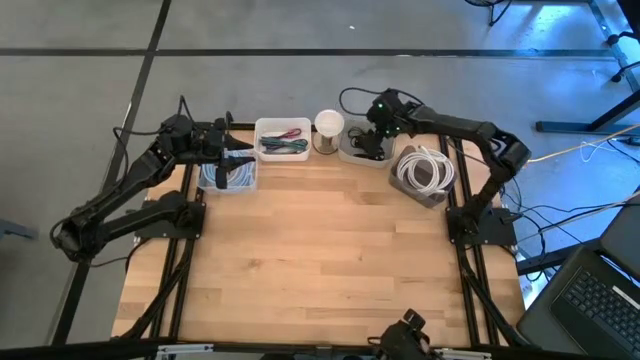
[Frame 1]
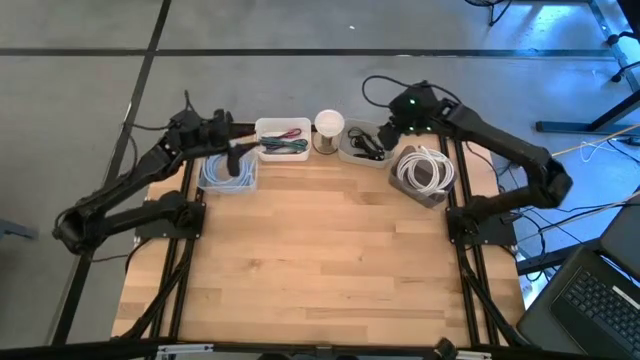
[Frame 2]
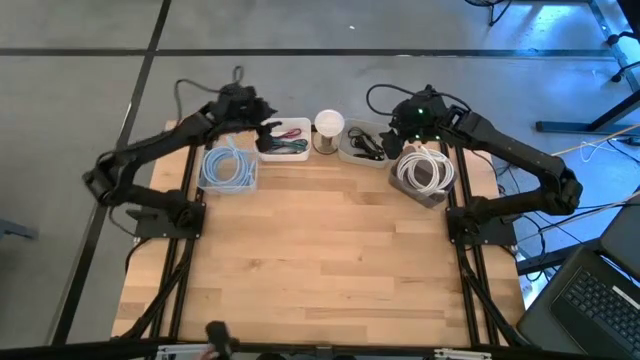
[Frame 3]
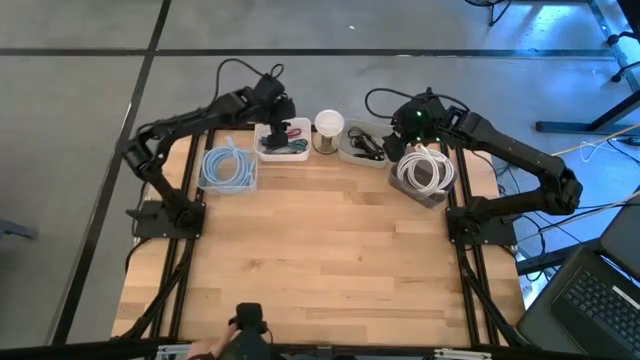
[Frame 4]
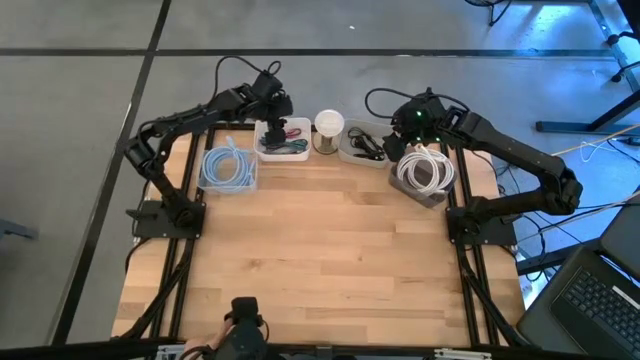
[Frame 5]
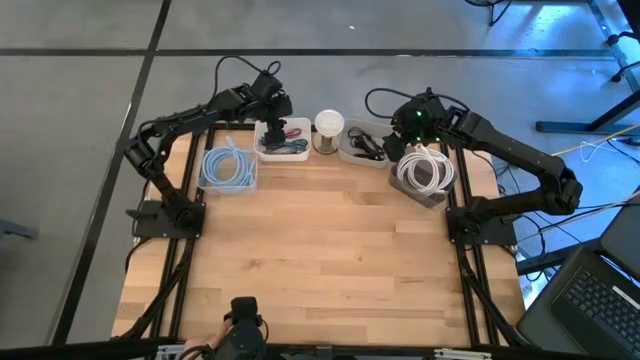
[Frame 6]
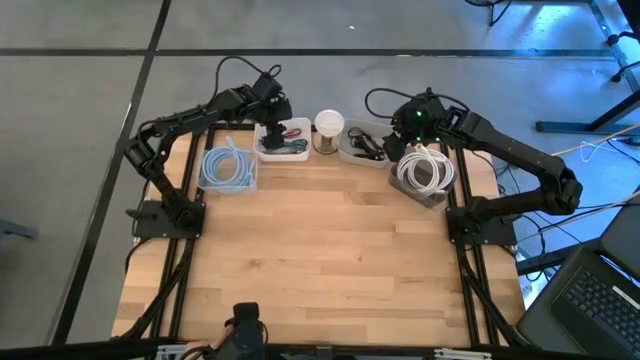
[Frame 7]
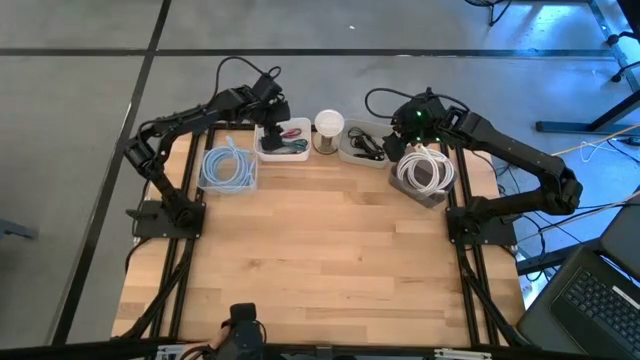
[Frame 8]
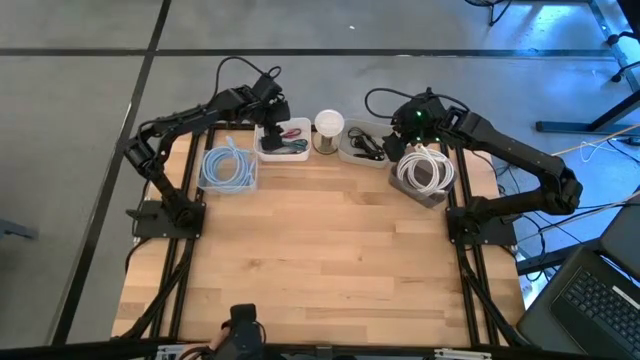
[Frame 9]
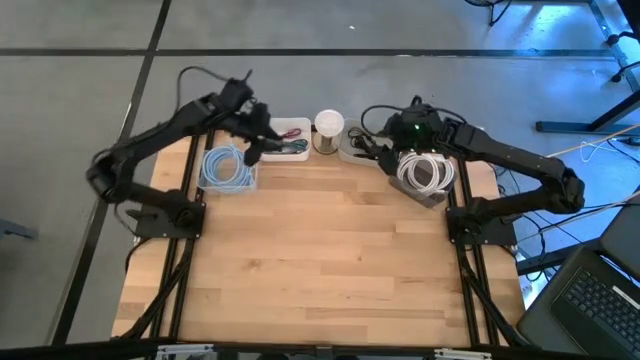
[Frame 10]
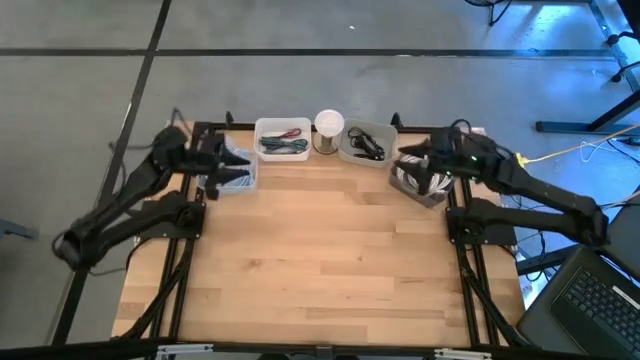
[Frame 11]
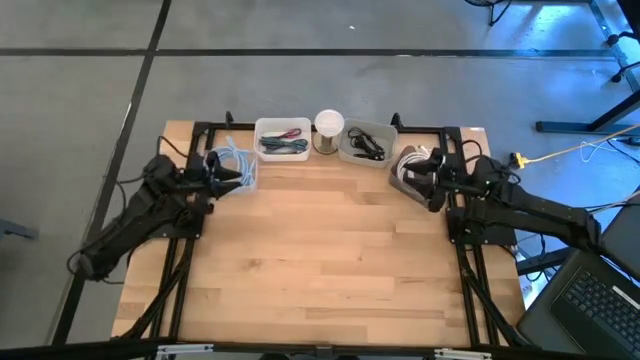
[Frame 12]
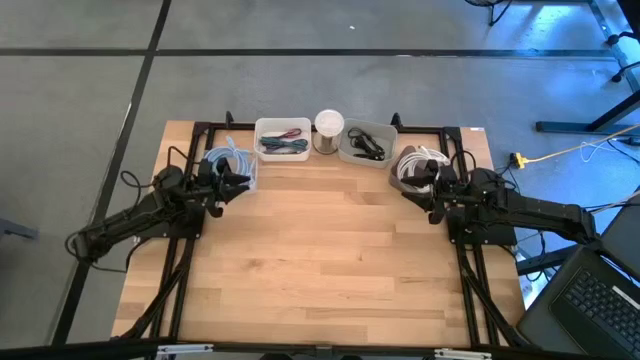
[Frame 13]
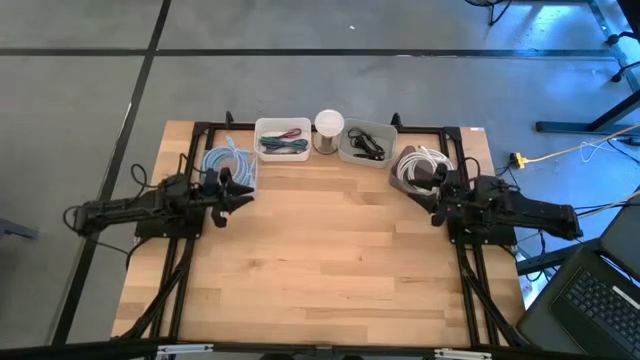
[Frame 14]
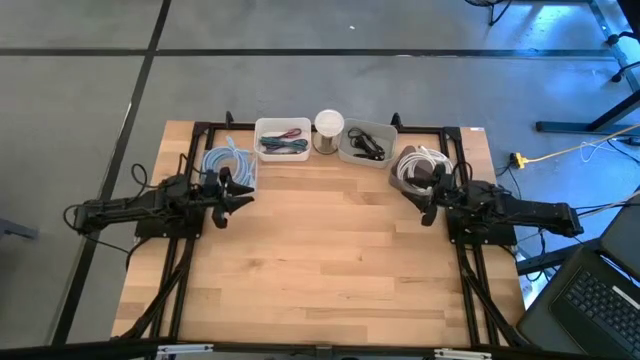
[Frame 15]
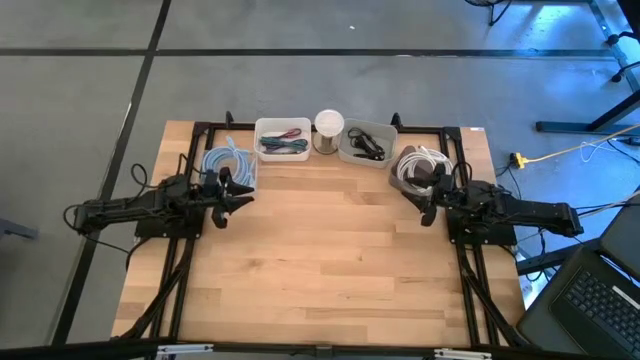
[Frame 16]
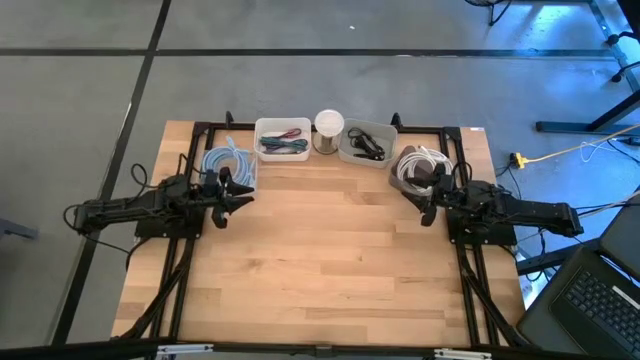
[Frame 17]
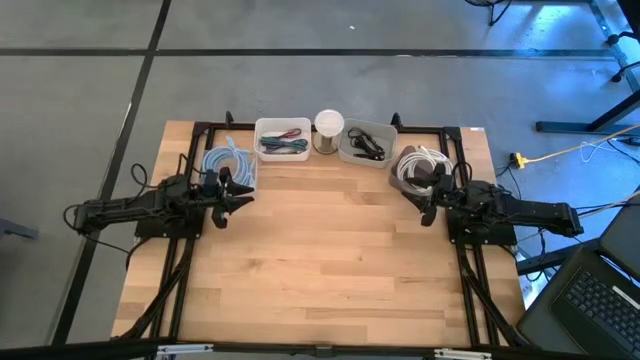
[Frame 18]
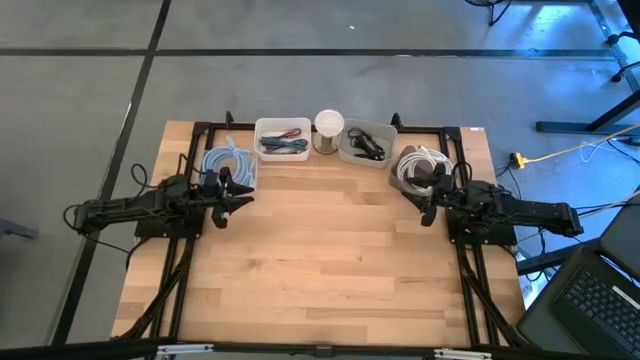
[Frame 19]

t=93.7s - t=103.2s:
Task: Pick & Place USB Port
Return to Home Position

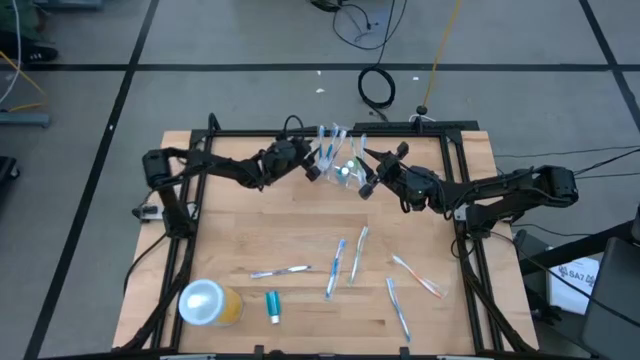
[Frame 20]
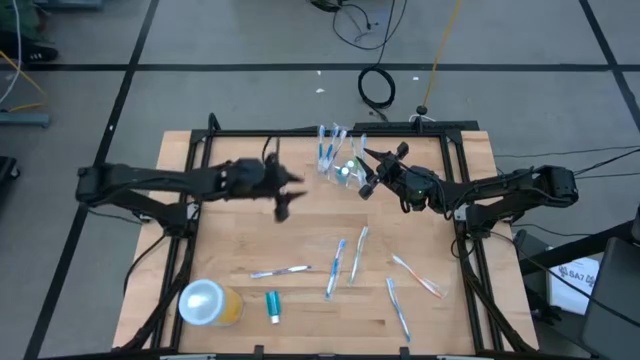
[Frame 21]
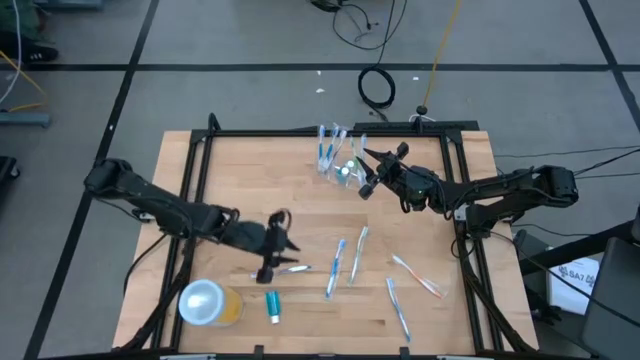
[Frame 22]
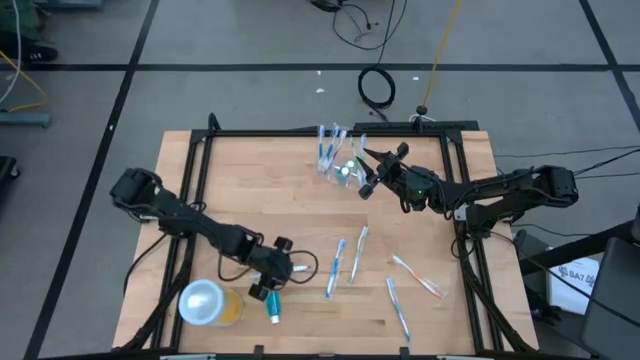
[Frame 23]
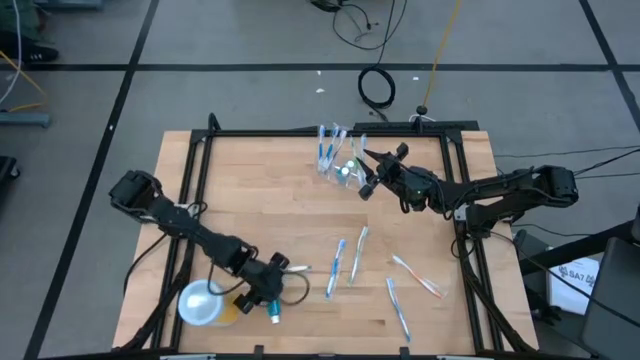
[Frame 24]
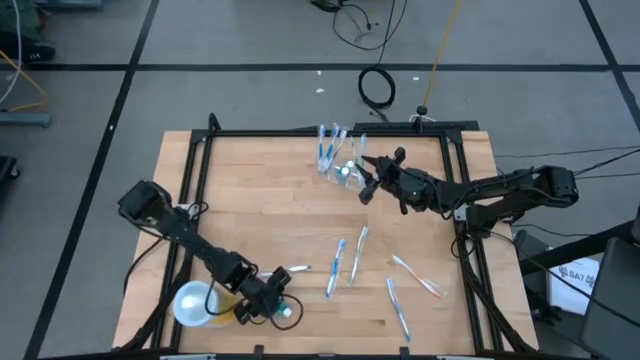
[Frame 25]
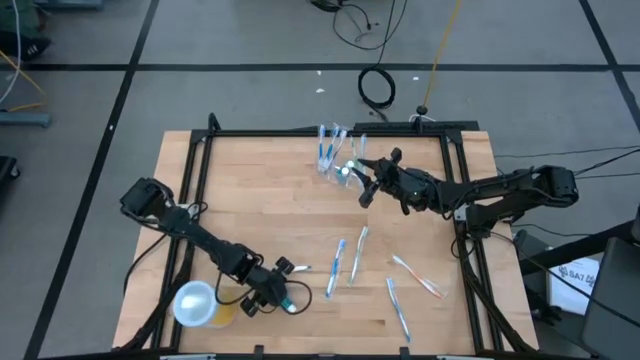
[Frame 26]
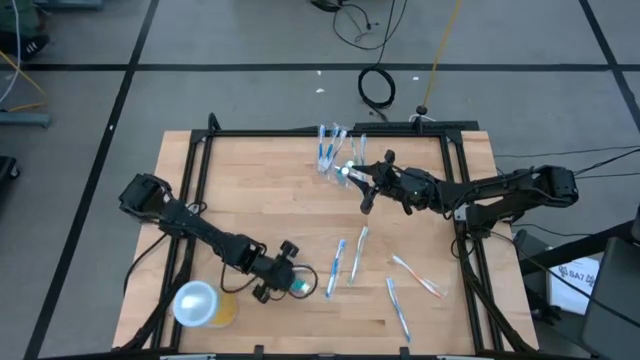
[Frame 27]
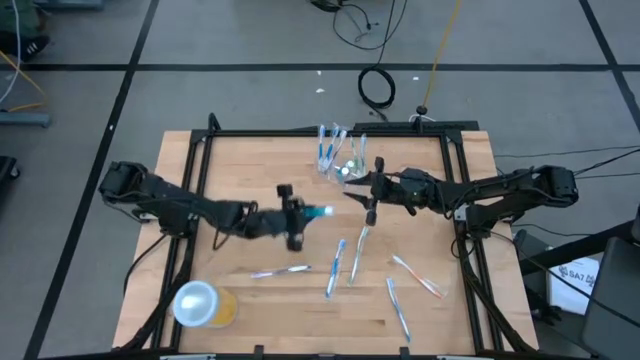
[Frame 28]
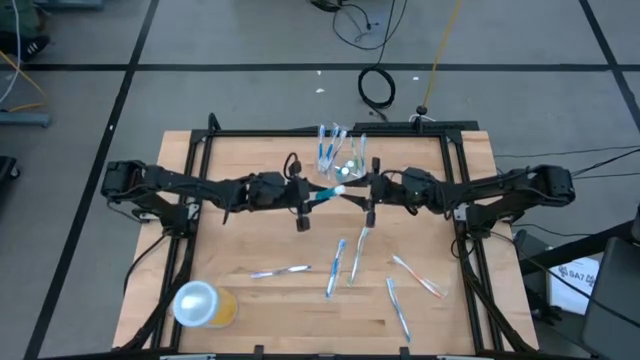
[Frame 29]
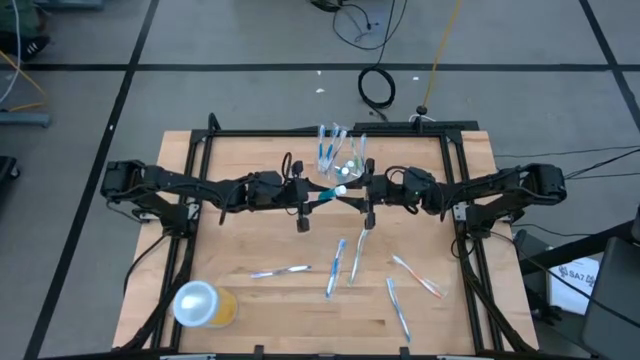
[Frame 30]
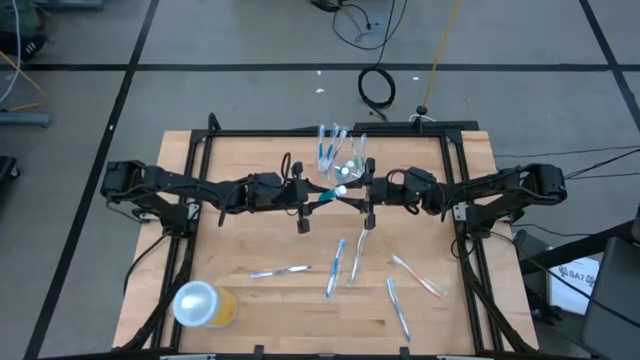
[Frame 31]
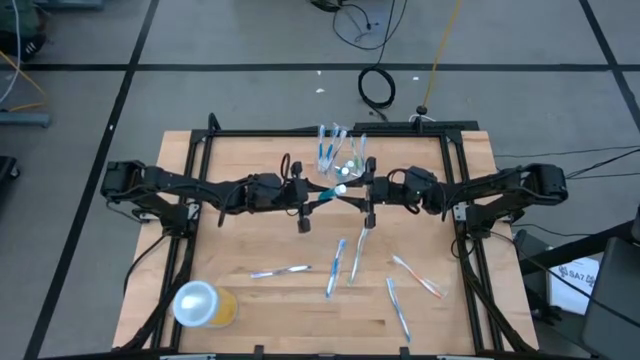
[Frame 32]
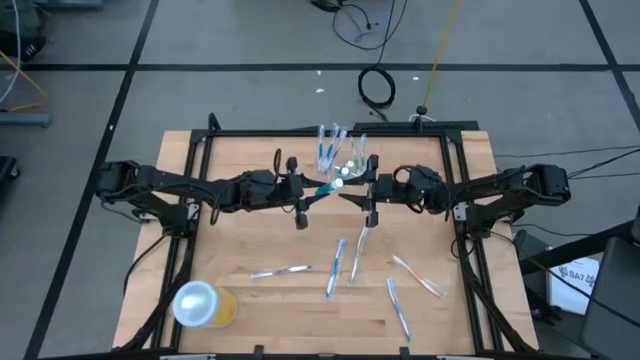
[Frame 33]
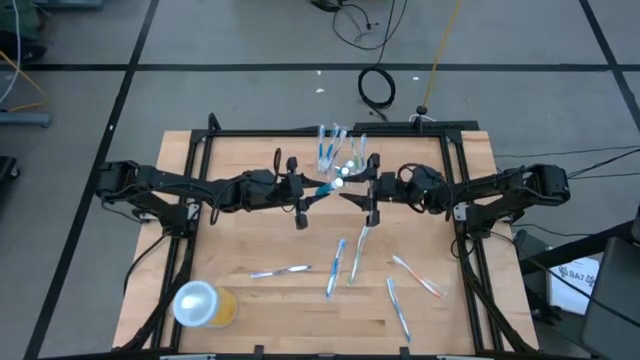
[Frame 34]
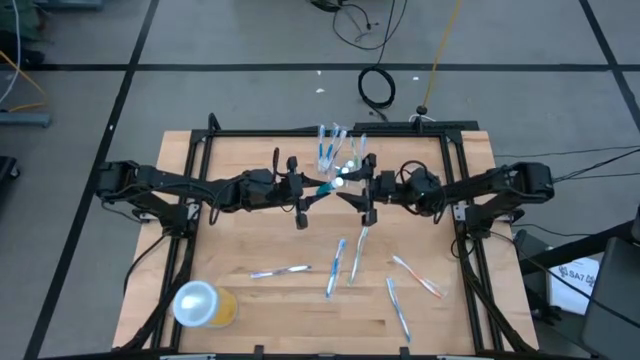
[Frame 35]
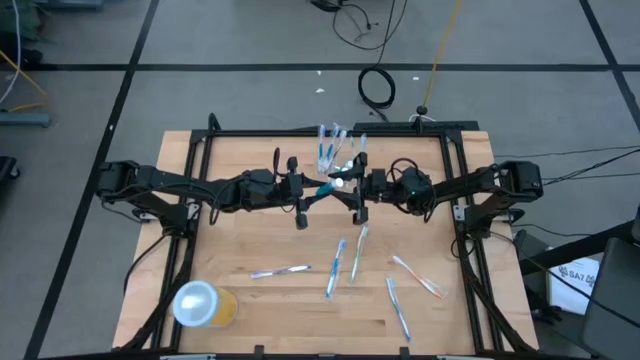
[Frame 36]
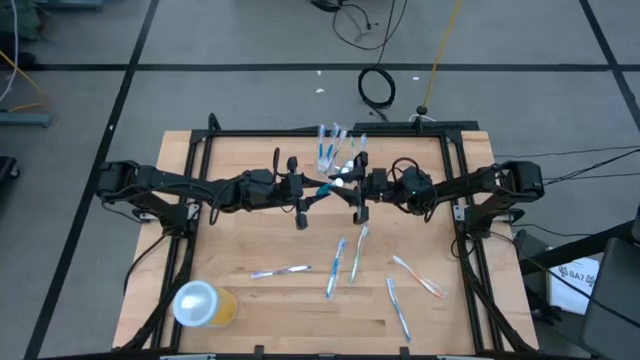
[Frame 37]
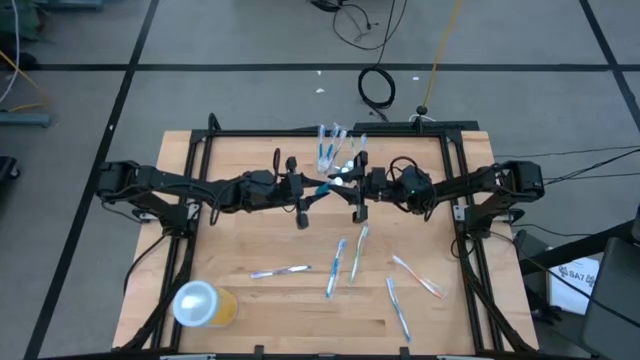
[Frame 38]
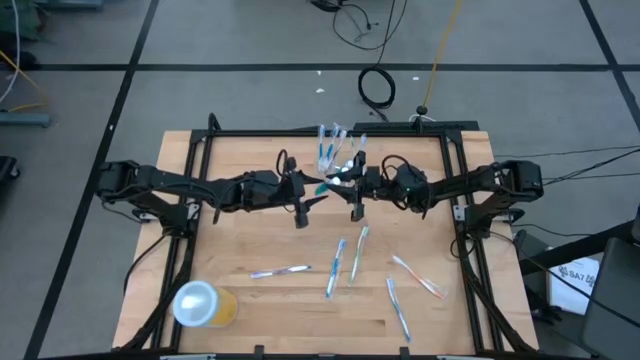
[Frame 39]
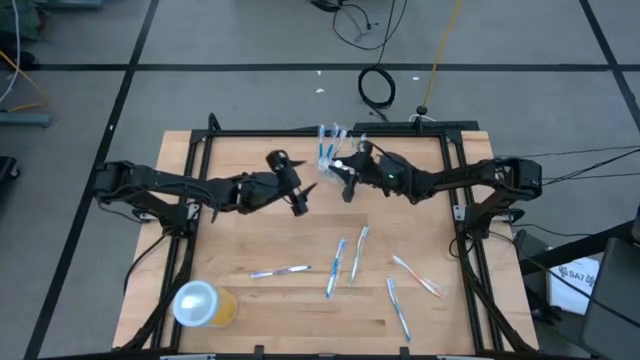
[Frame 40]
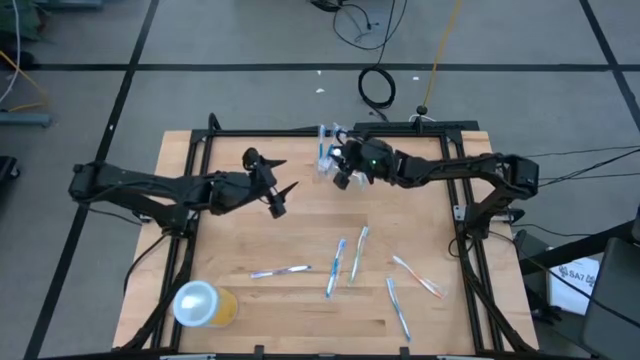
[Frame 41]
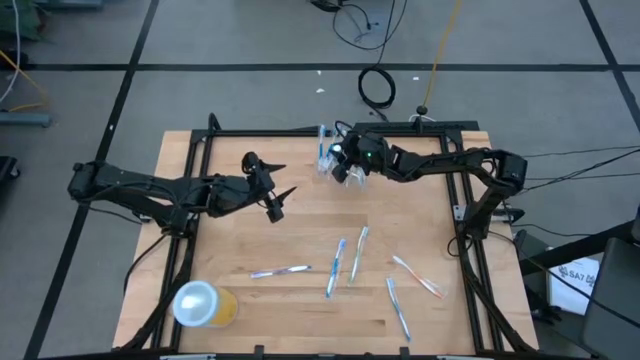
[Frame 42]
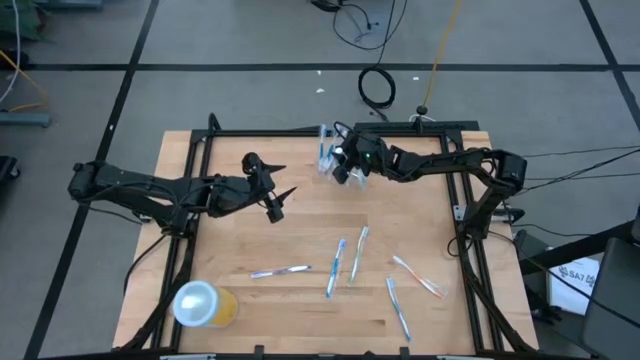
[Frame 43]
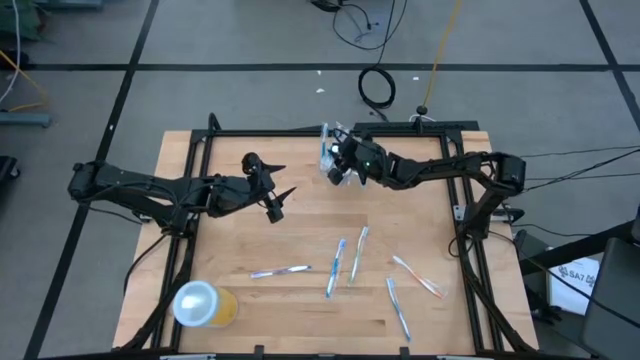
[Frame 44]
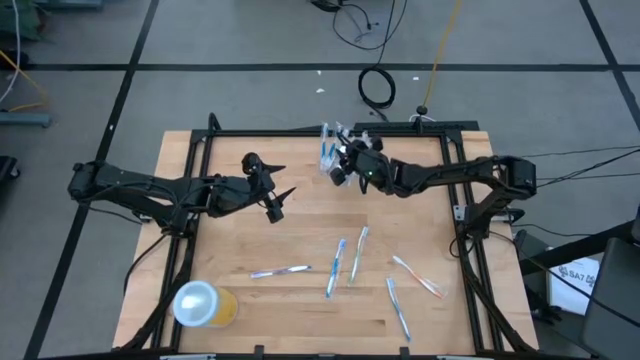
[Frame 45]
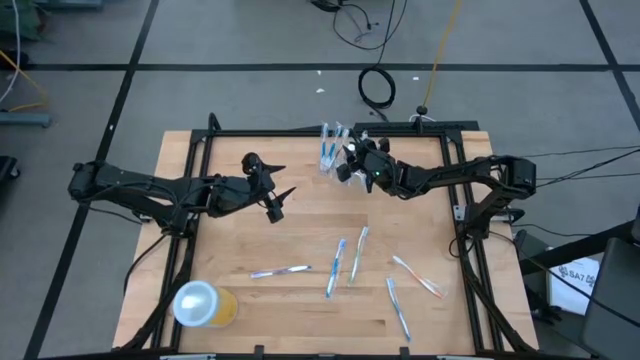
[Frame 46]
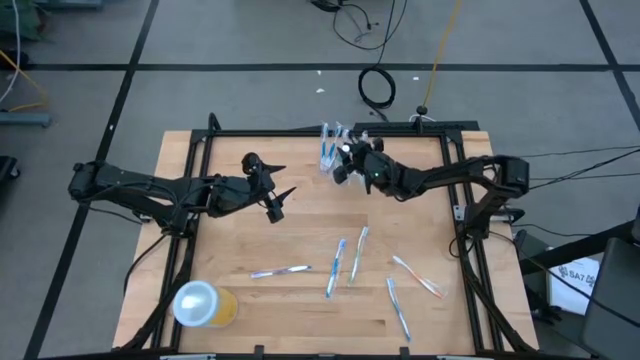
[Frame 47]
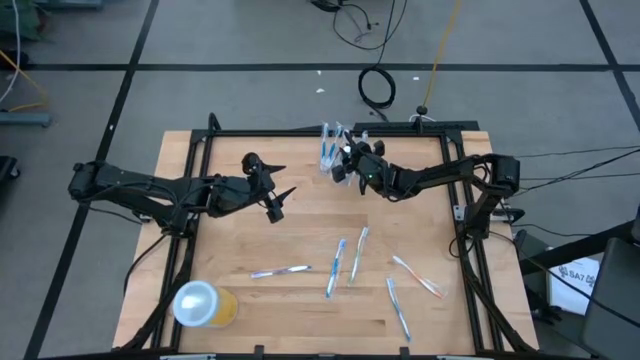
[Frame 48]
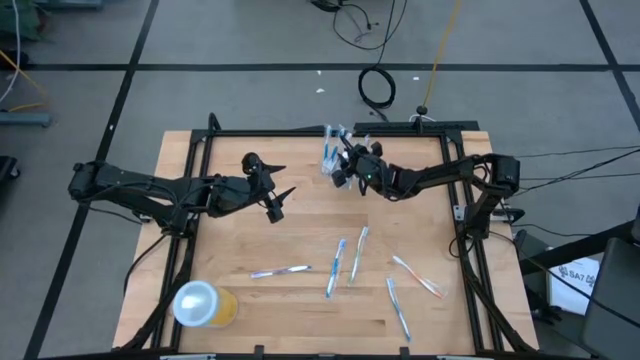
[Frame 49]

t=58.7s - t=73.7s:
Task: Pick & Place toothbrushing station
Put the blue mouthwash into the transparent organizer
